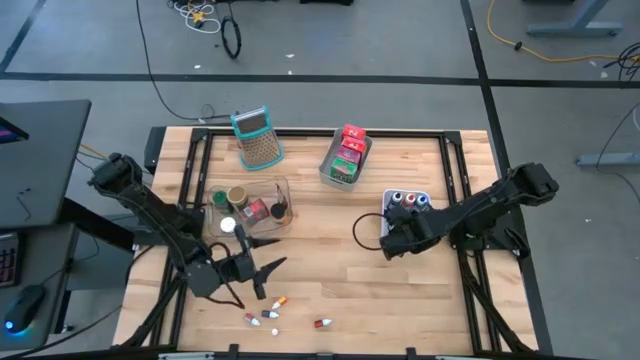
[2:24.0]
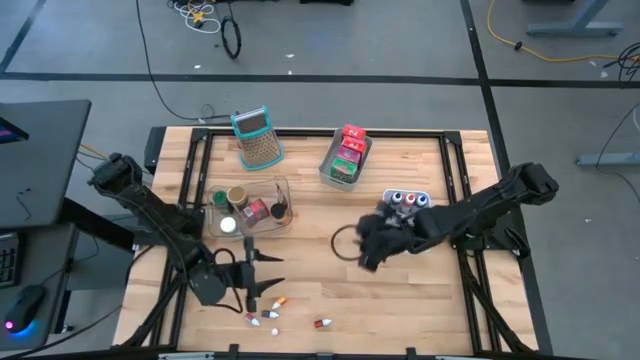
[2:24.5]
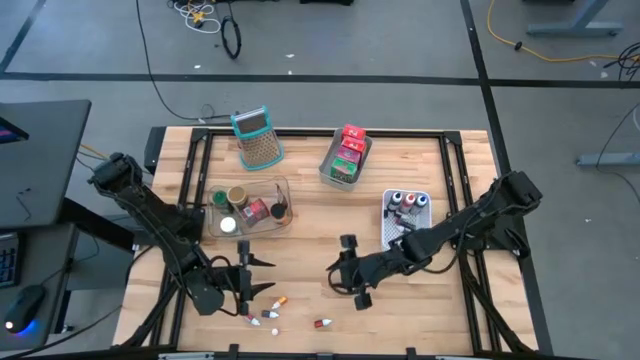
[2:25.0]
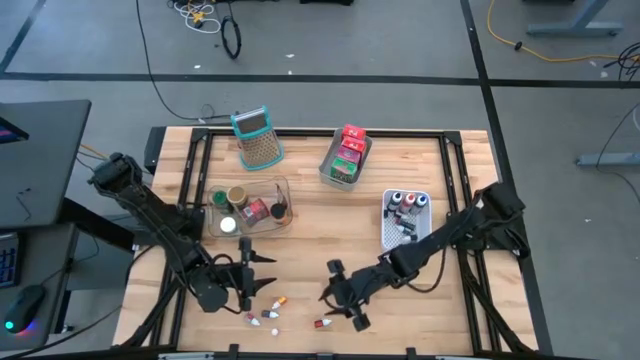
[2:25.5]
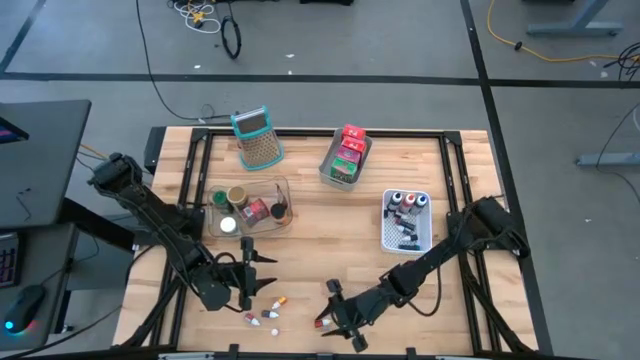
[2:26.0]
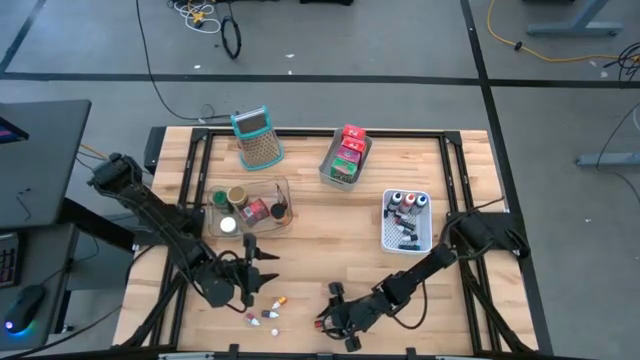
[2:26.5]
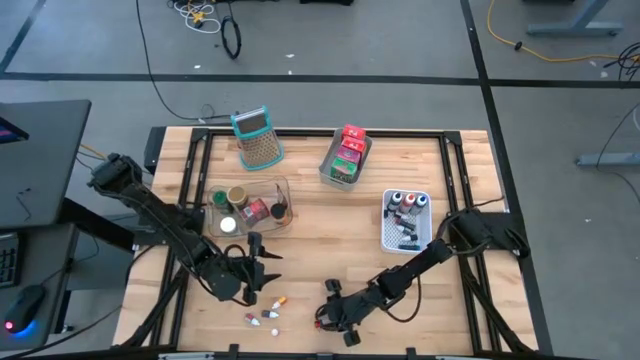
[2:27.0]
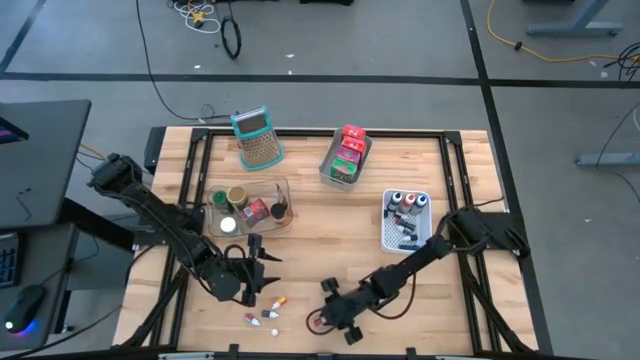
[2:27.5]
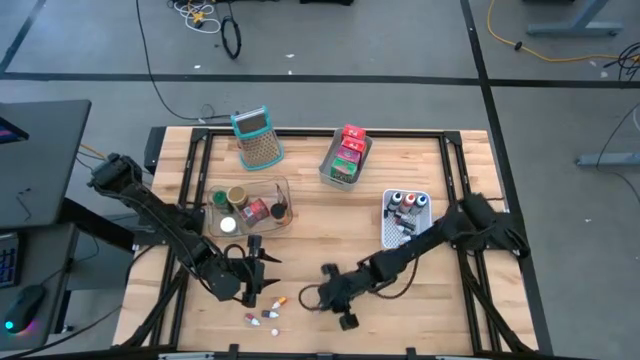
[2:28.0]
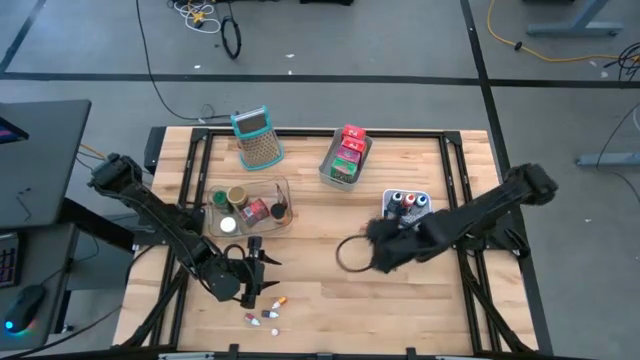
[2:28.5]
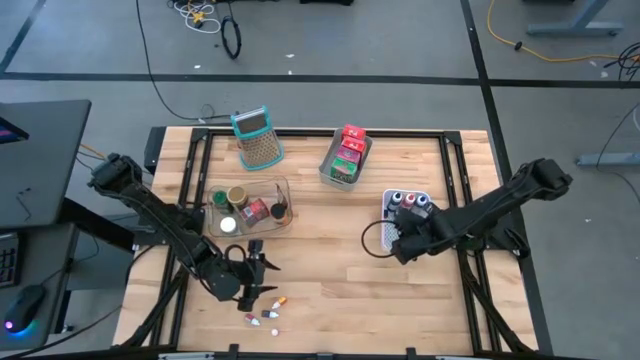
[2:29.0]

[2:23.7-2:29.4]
Task: Pick & Place Kitchen Items
Put the red food coloring bottle into the white bin

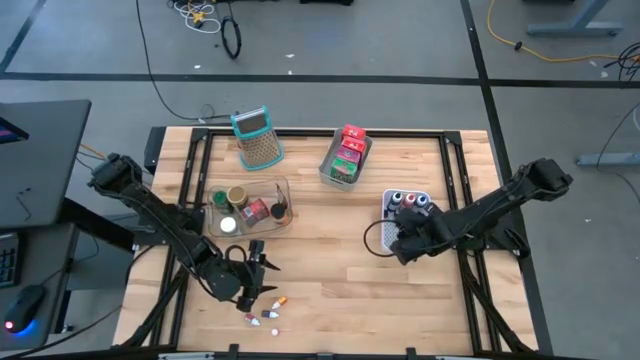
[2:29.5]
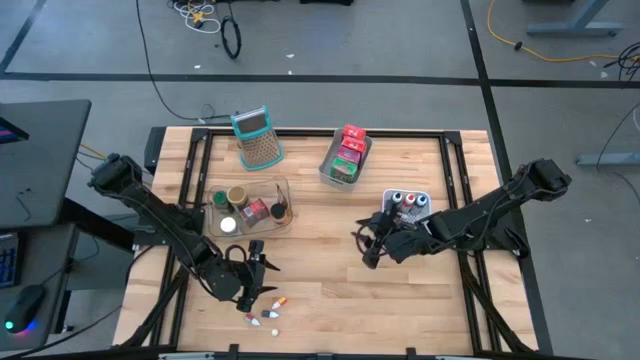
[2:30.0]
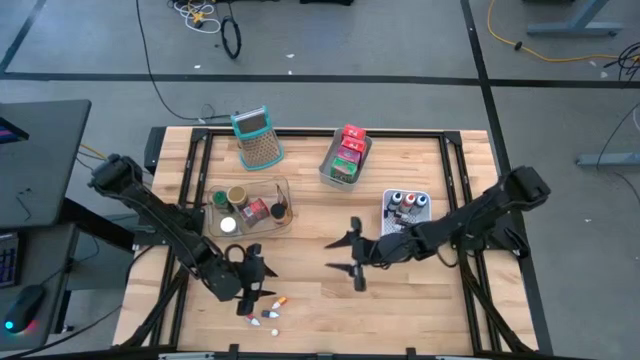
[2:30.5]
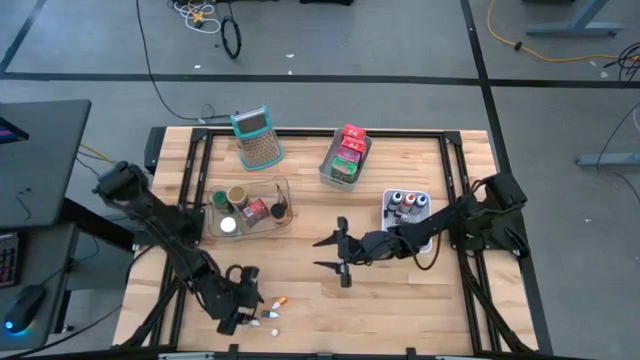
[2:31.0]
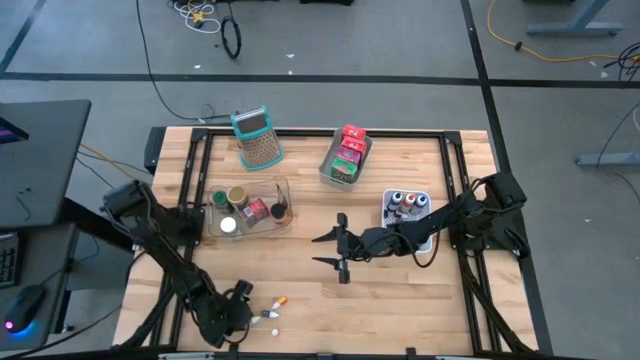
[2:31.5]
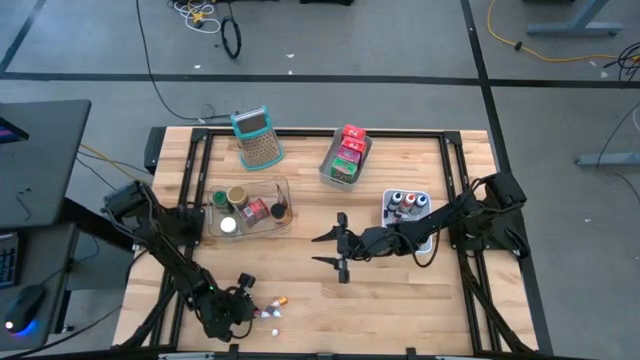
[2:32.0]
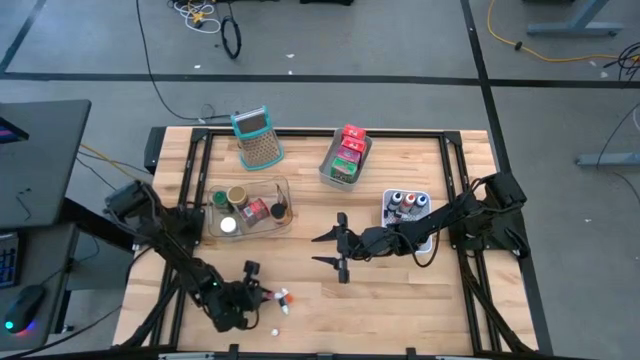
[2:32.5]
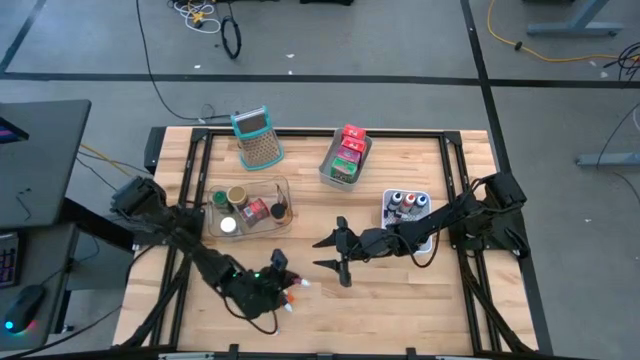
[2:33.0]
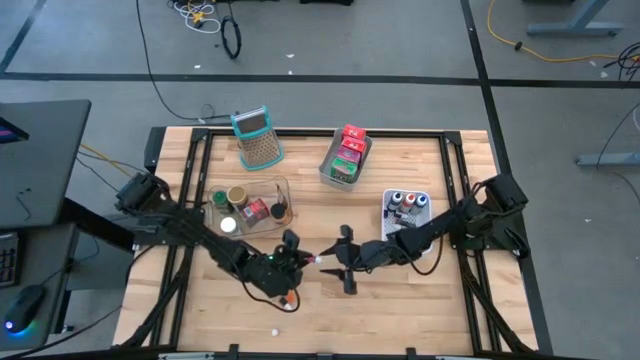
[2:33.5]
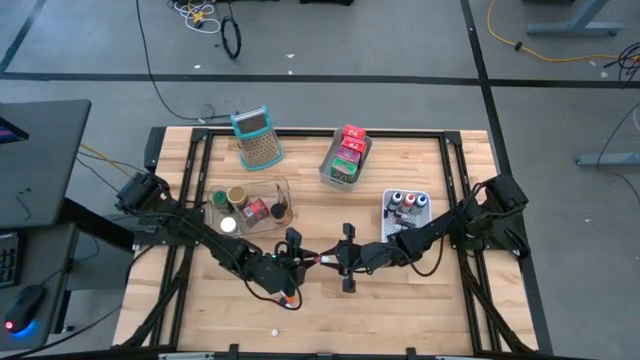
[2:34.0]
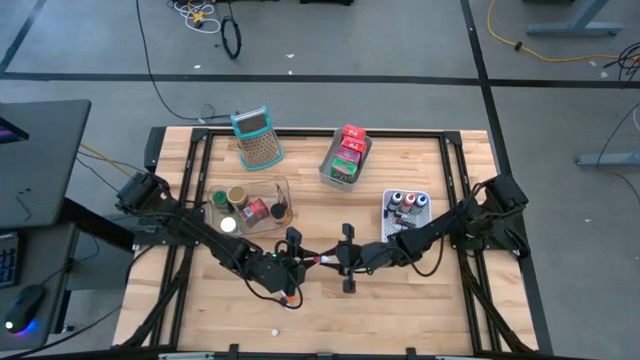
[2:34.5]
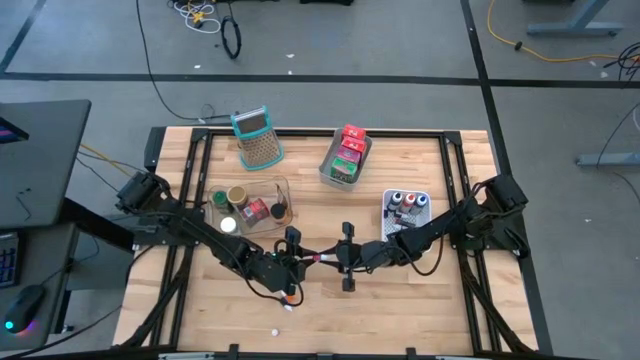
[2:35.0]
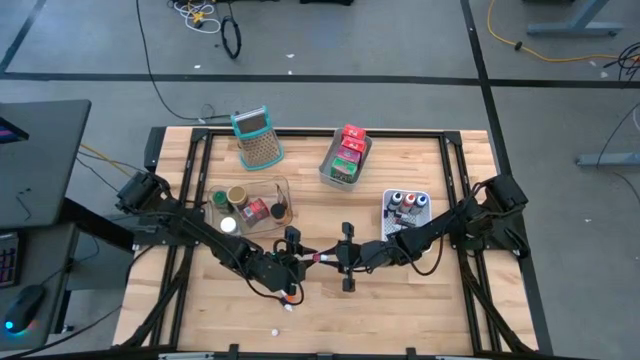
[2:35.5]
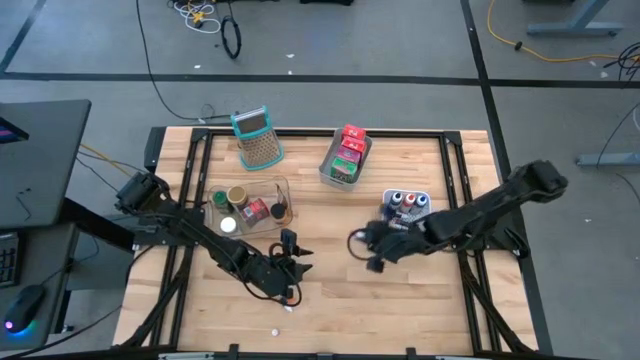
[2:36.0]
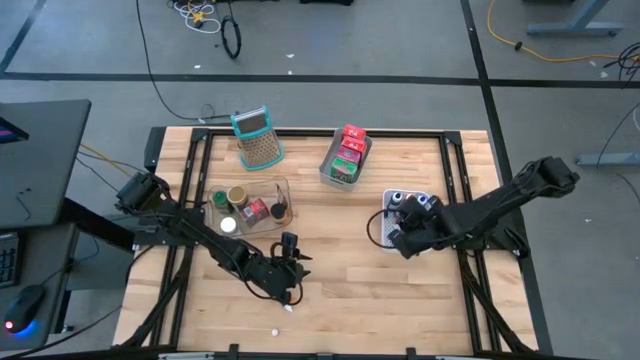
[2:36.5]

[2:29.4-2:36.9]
Put the pink food coloring bottle into the white bin

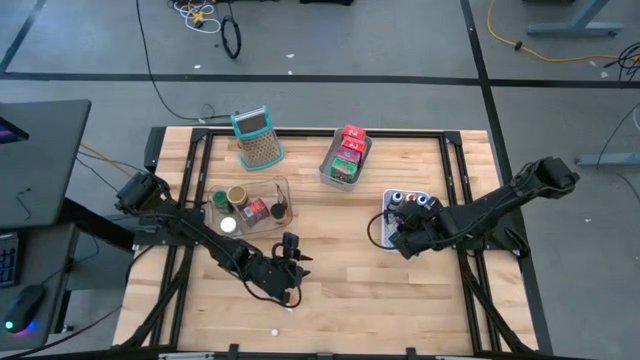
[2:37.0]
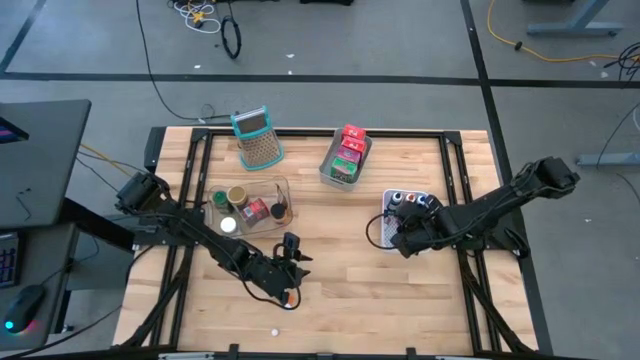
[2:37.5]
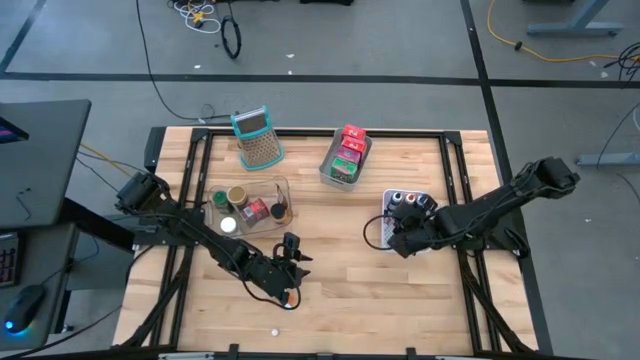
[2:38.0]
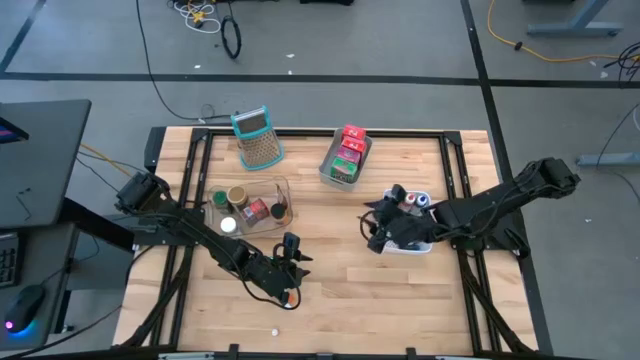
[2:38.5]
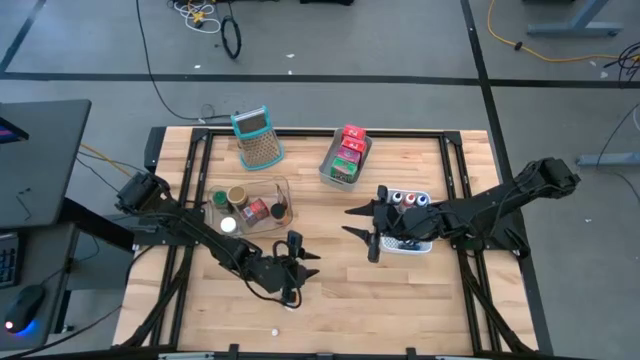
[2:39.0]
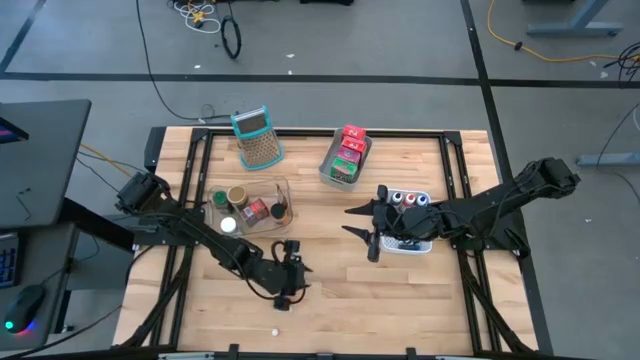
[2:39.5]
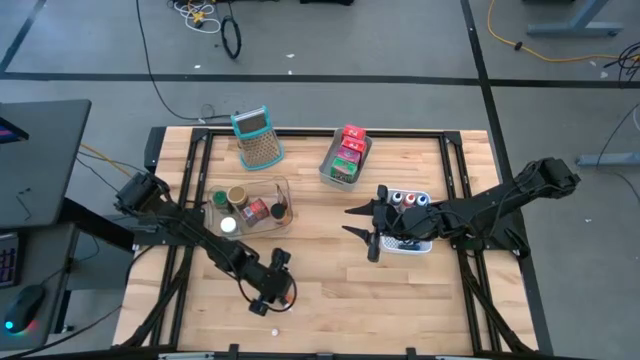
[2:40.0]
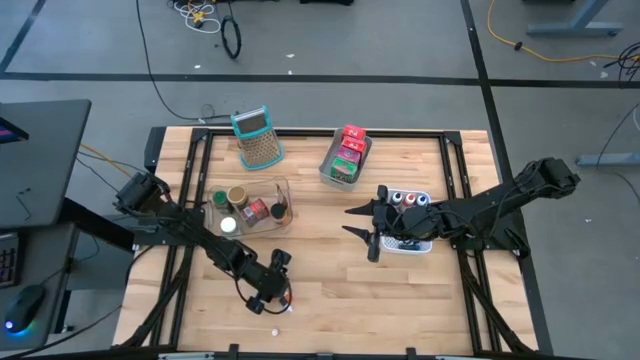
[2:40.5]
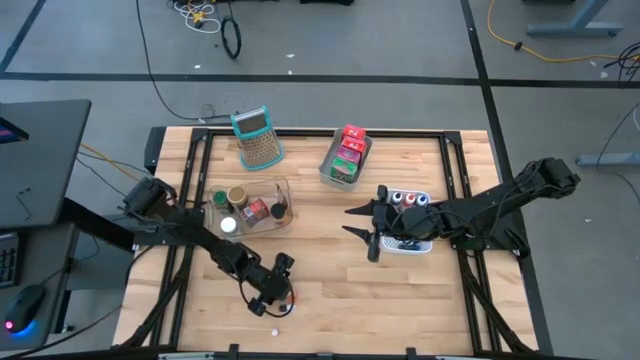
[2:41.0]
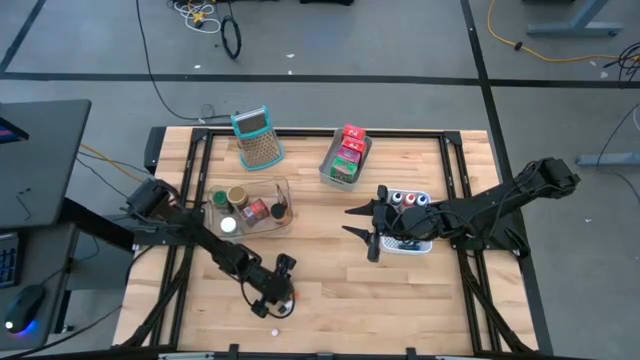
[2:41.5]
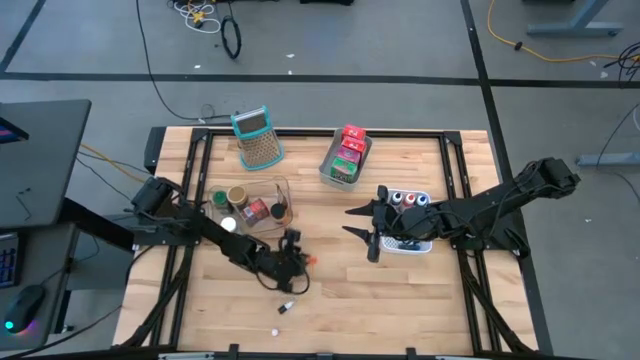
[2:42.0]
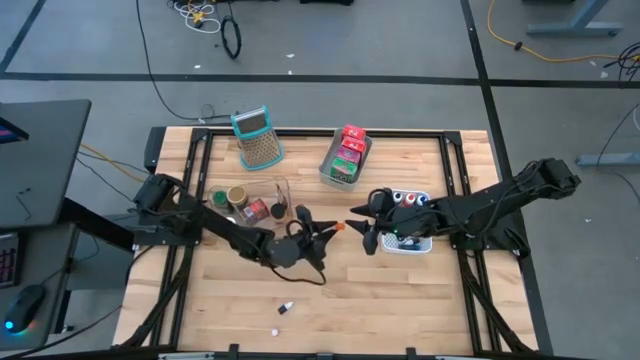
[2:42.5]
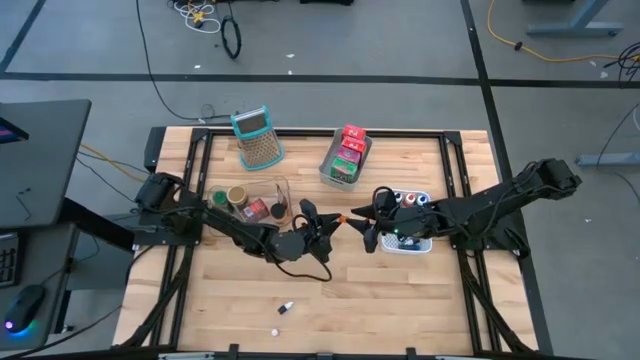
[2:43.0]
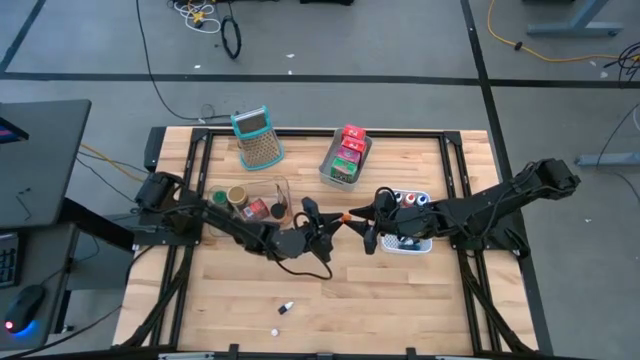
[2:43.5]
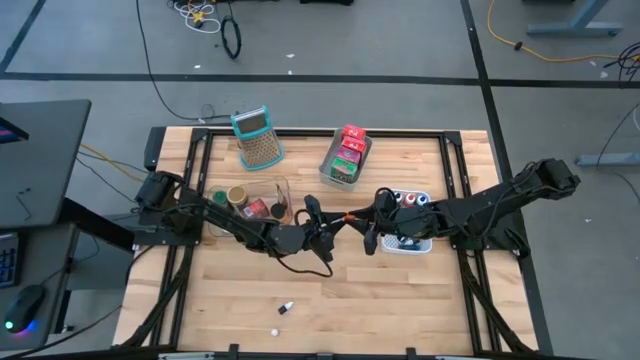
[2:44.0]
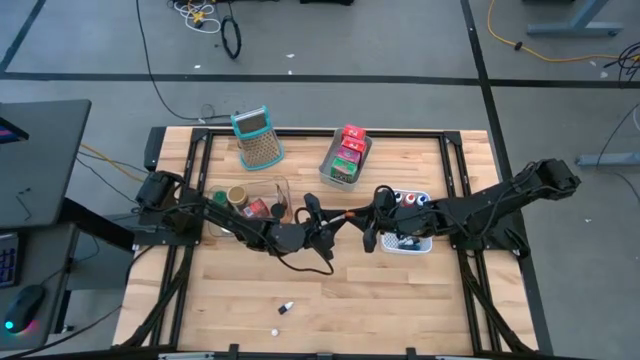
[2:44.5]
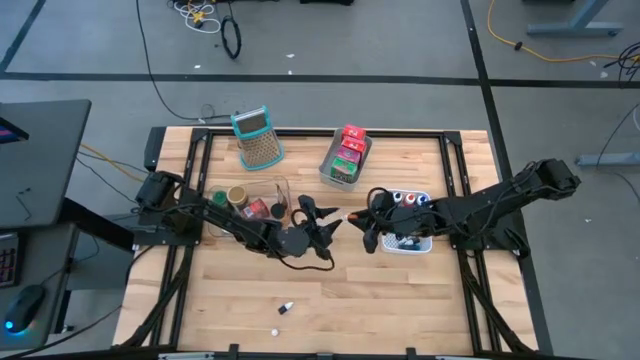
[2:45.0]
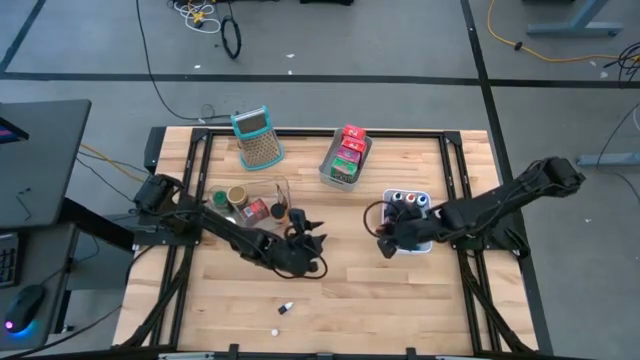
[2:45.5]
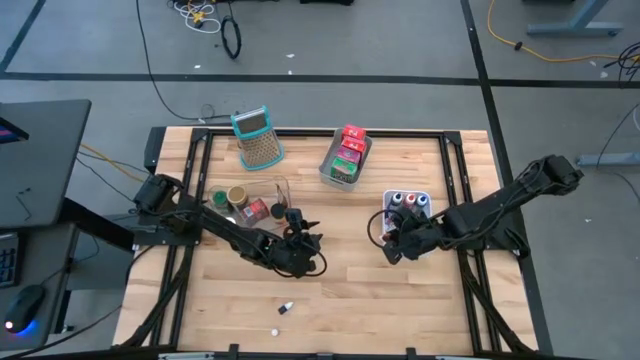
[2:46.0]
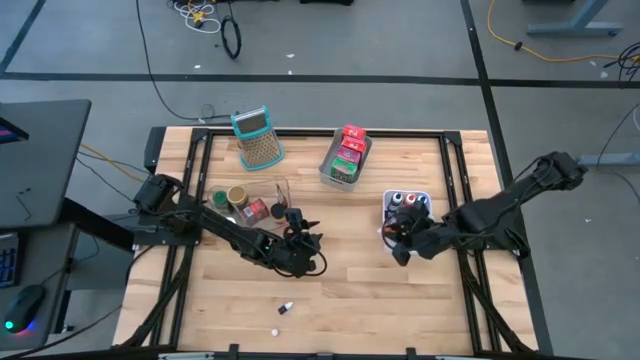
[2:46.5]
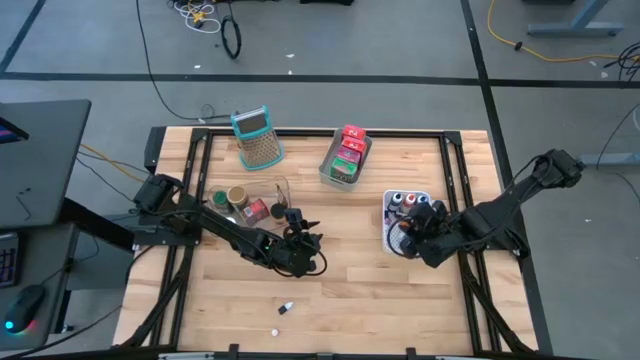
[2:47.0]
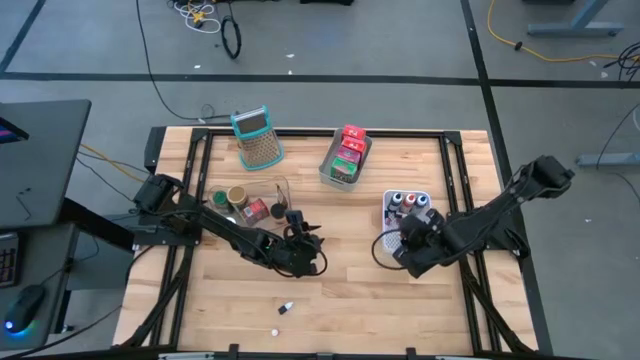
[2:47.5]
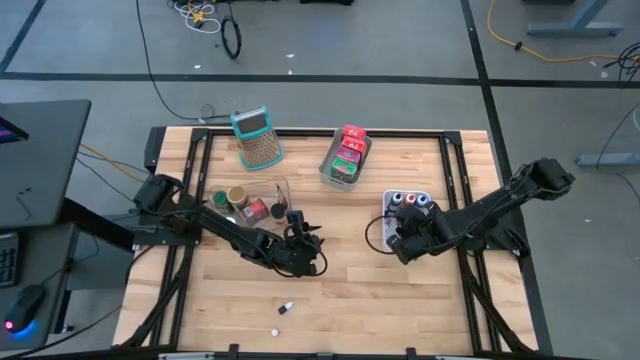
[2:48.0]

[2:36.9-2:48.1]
Put the orange food coloring bottle into the white bin
